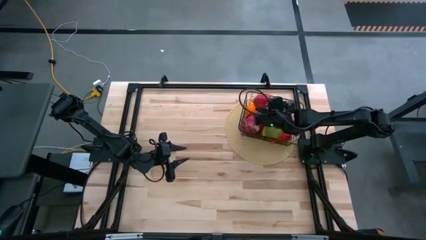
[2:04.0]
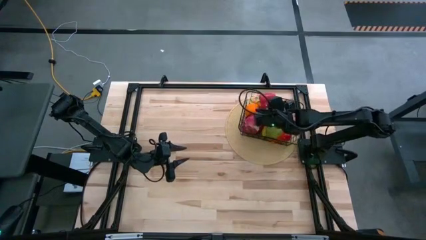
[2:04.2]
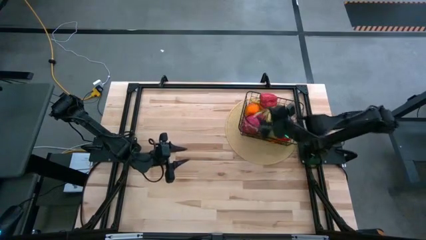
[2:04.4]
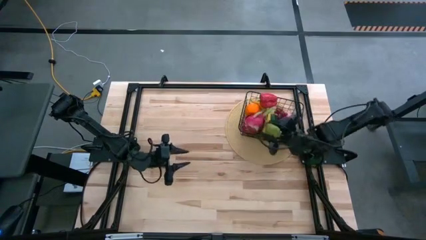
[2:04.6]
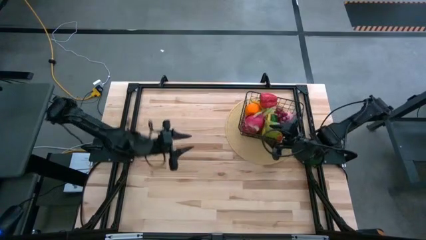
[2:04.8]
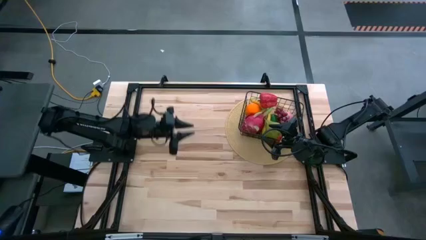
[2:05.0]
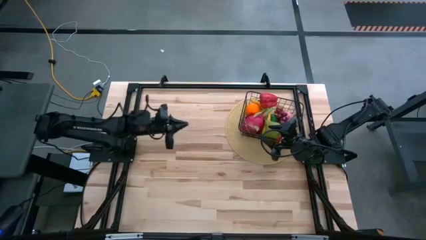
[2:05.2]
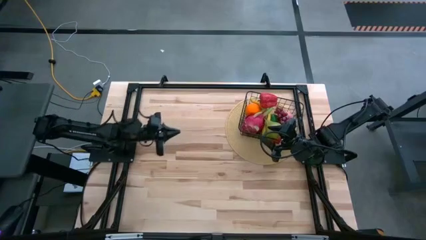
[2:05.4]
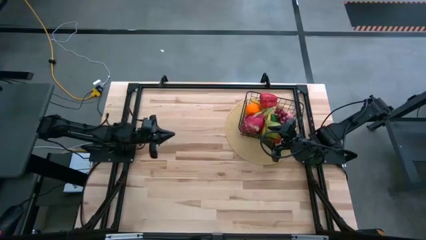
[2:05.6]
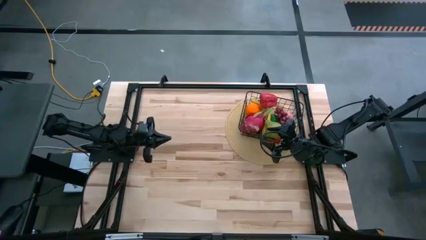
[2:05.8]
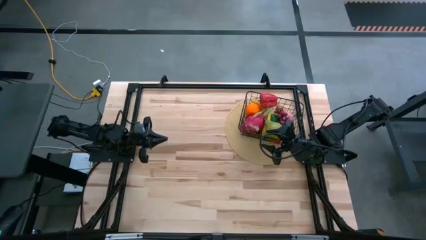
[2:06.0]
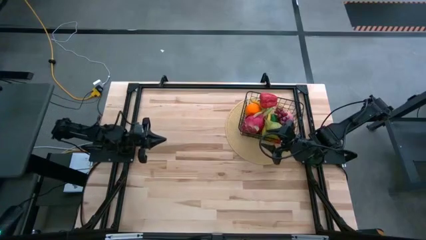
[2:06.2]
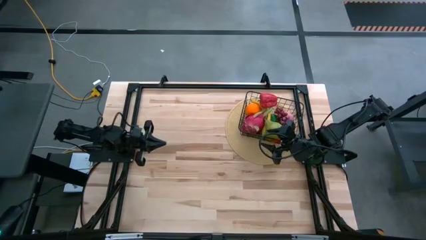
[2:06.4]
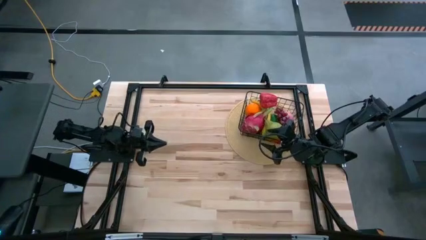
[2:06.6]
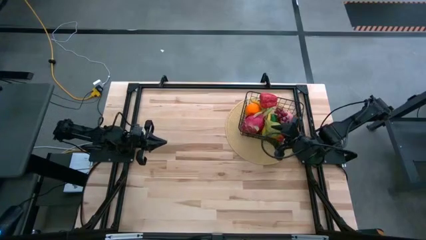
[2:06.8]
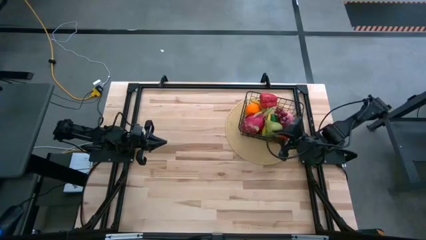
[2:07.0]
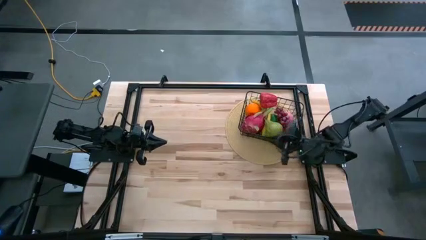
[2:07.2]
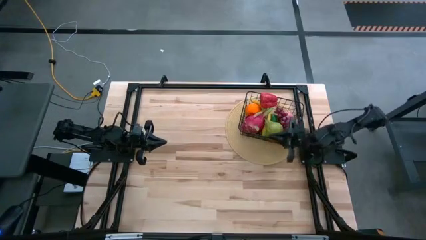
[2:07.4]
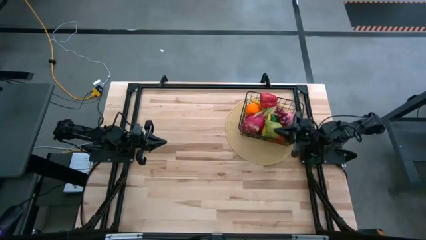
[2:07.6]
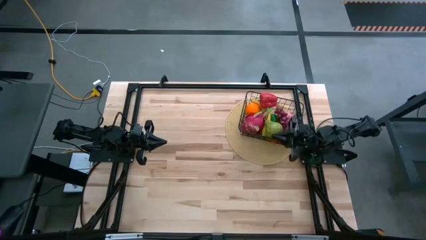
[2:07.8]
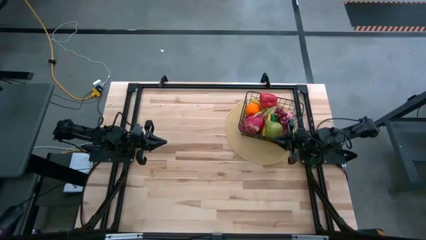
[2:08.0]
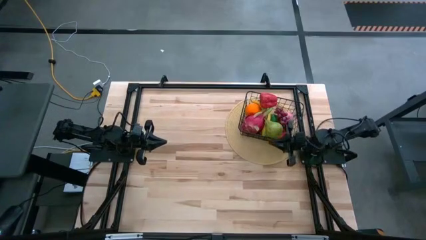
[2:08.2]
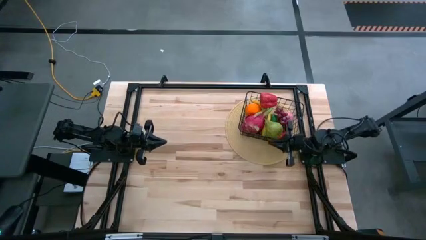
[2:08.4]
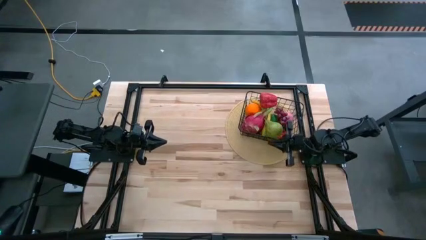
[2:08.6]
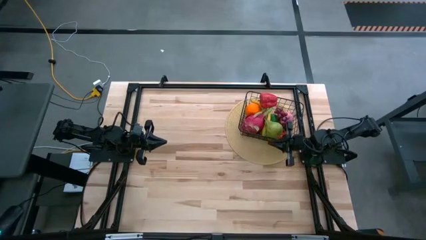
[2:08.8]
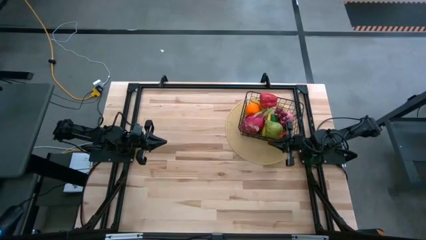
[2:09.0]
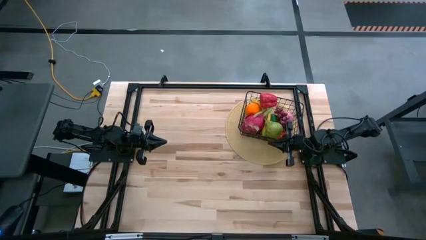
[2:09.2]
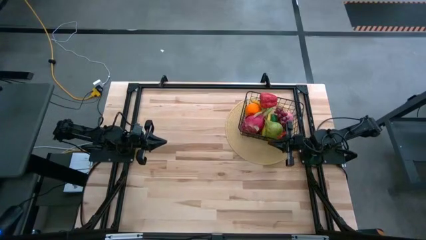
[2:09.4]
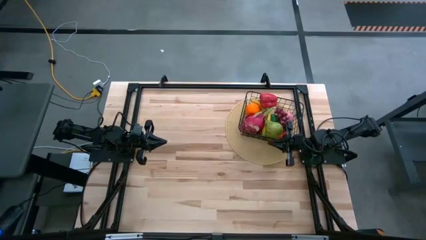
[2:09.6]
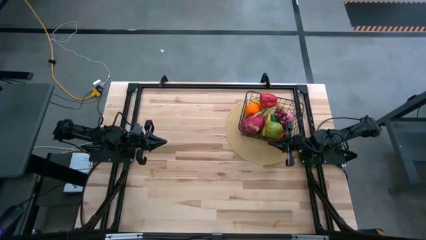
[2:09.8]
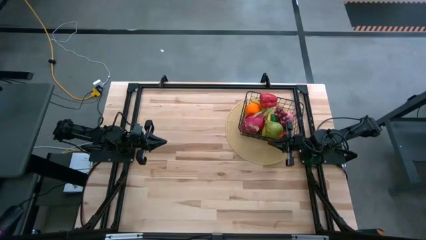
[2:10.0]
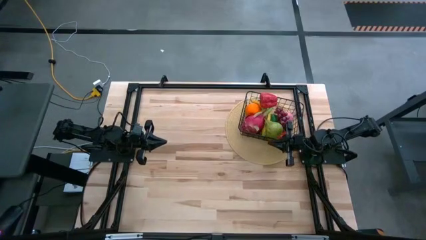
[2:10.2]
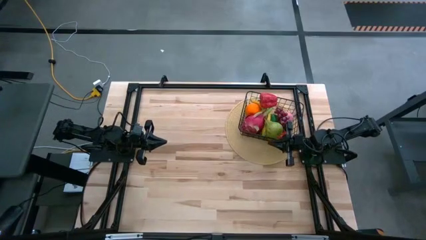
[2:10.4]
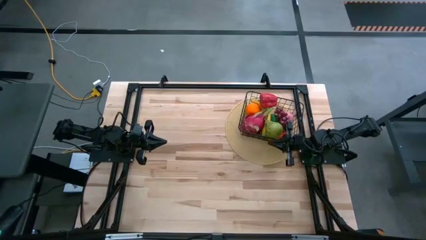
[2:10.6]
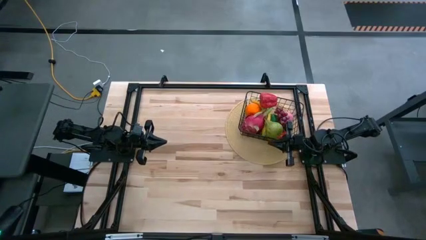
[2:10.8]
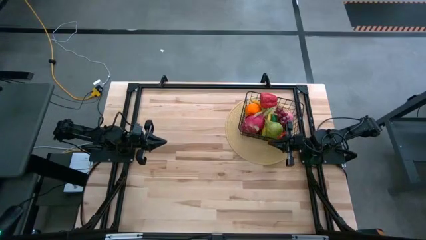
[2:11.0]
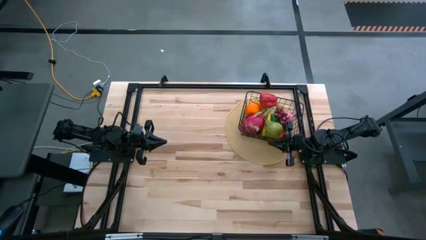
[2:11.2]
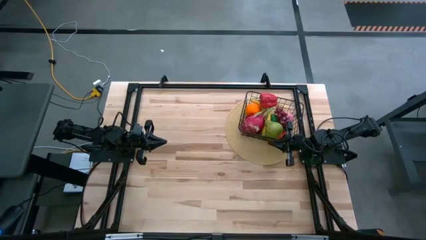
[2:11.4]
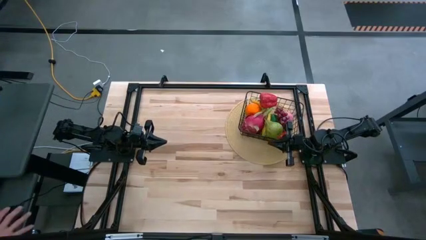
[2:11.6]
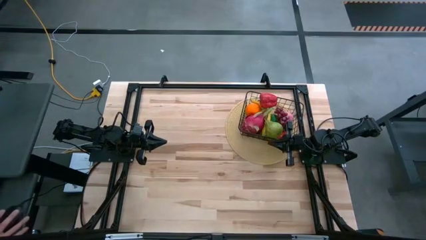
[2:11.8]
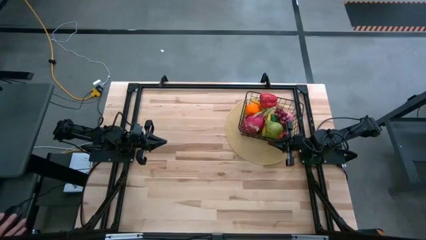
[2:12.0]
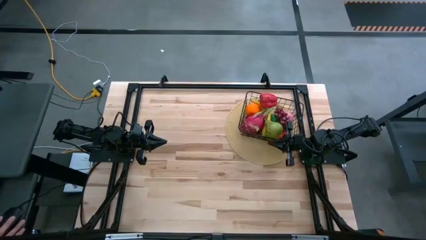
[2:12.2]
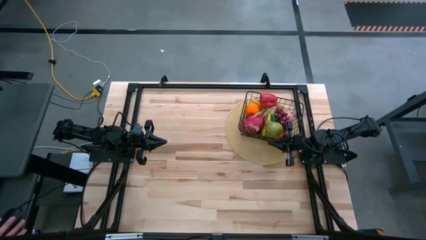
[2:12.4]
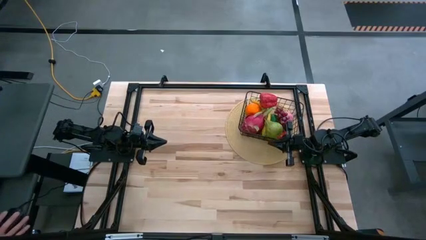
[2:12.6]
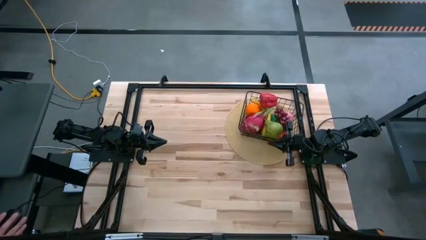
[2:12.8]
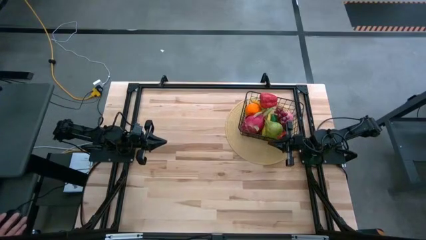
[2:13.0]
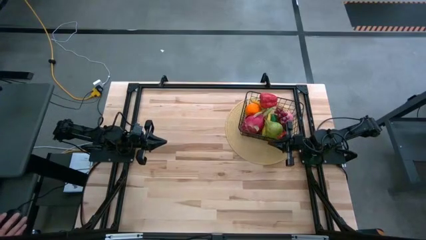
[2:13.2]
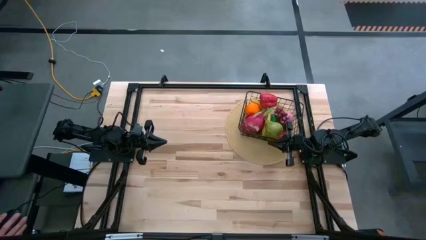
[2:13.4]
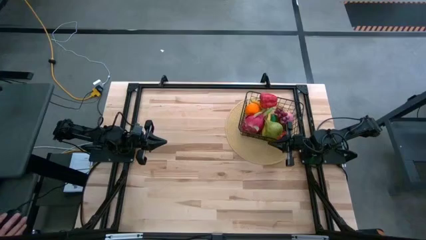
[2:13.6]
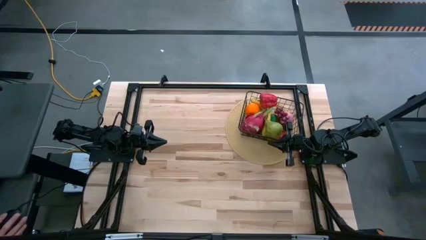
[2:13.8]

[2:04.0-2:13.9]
Task: Build produce basket
Return to Home Position
